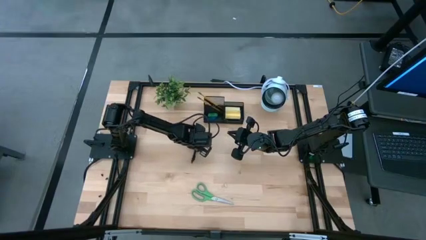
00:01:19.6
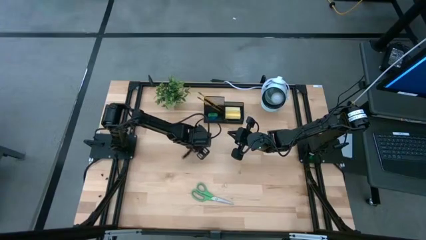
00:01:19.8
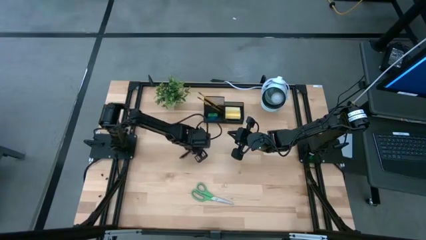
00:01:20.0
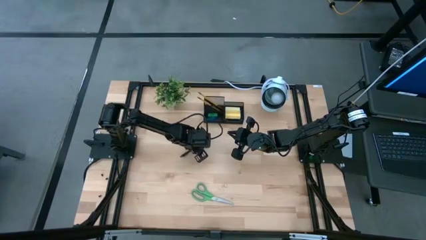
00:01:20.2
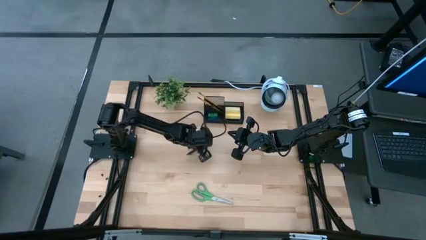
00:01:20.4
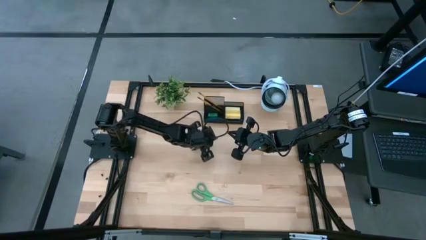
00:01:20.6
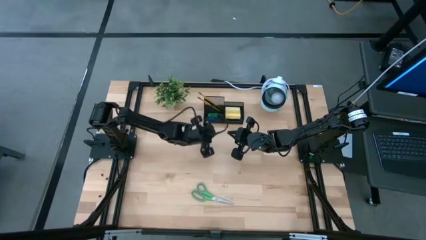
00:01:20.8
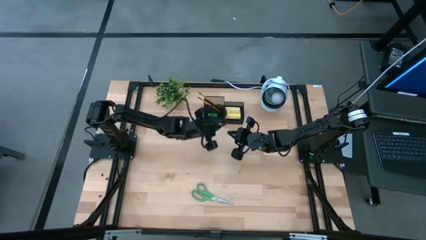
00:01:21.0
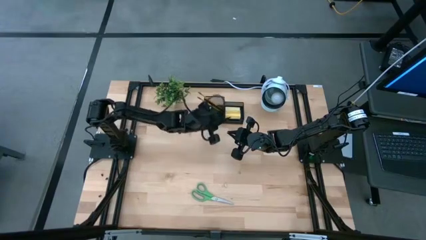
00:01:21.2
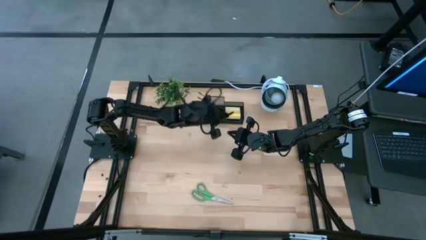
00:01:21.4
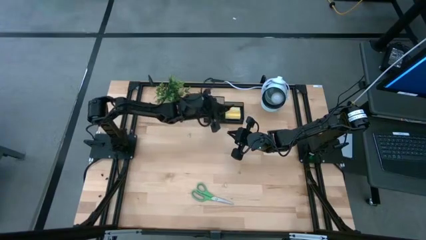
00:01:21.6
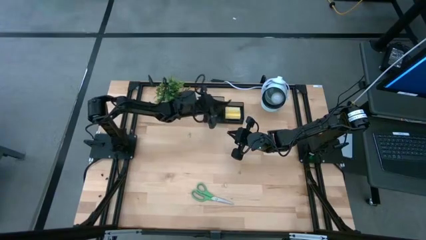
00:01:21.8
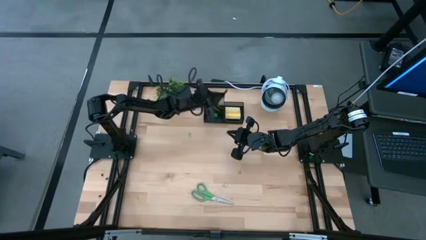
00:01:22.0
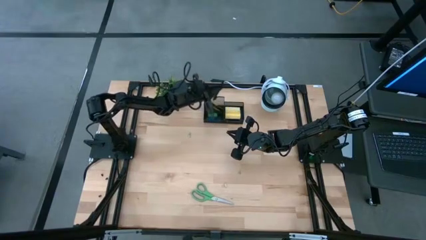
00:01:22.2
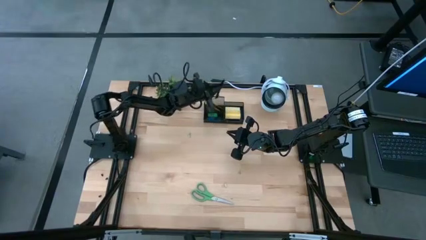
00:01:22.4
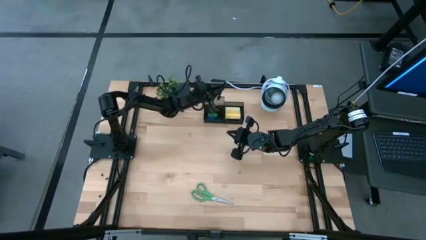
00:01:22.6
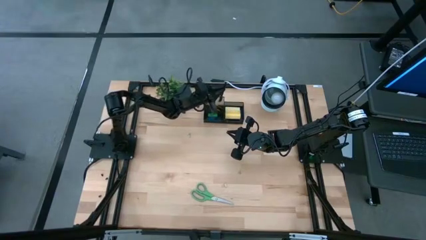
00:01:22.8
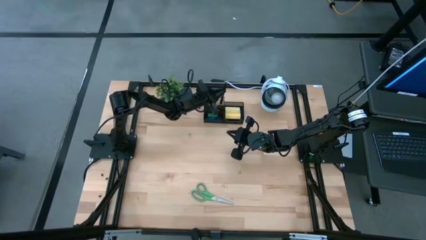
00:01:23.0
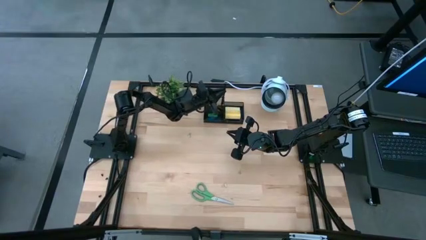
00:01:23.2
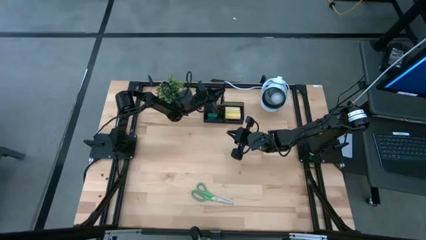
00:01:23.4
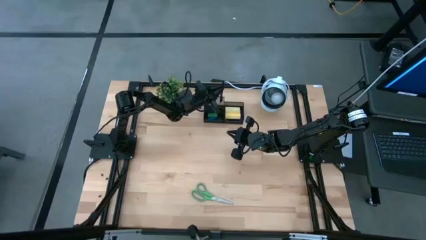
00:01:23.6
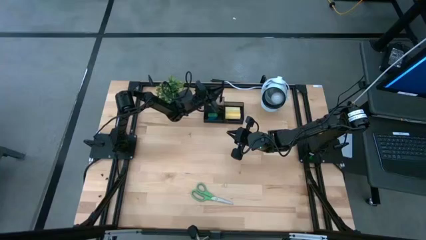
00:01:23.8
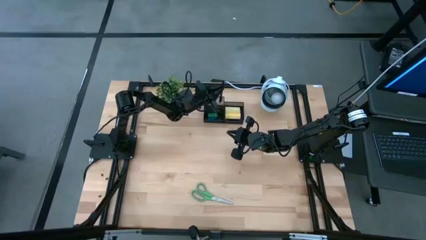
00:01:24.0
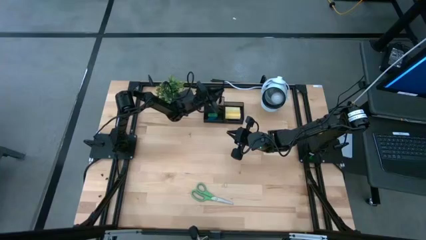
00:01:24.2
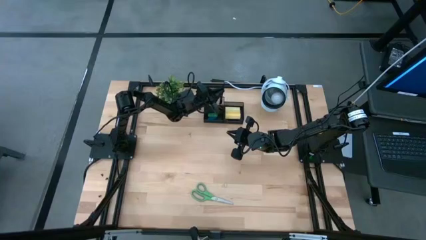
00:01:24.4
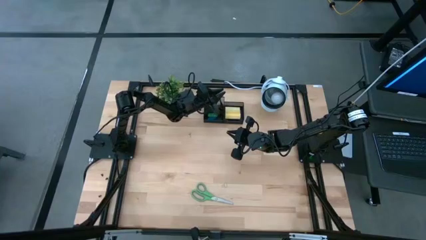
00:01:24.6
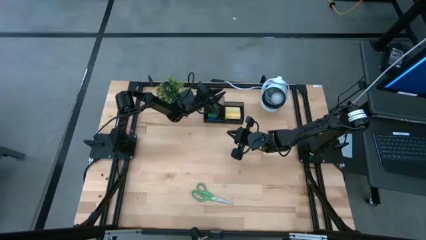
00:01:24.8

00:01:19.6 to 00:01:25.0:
Task: Pick and place office supplies into organizer
Put the black pen into the black organizer

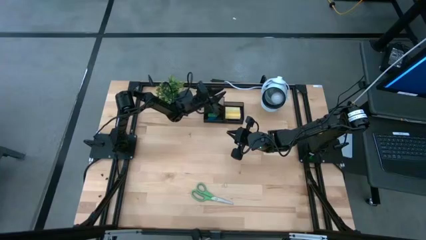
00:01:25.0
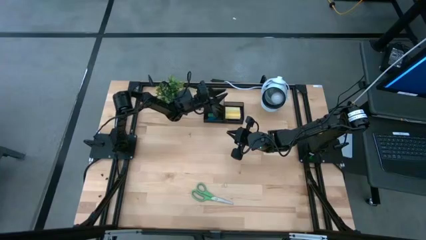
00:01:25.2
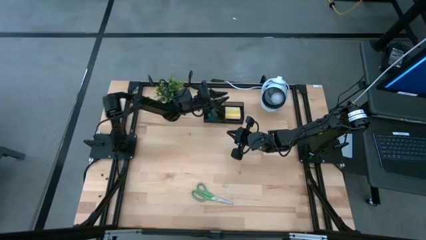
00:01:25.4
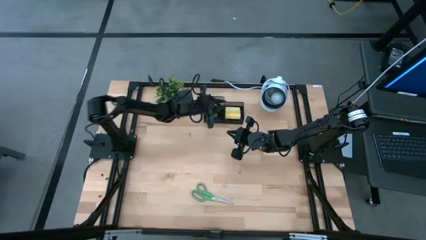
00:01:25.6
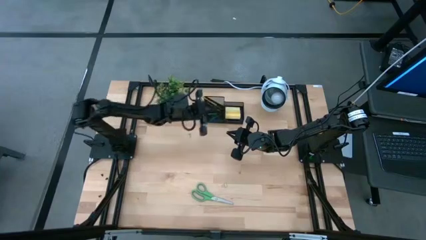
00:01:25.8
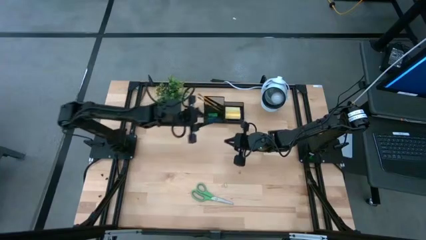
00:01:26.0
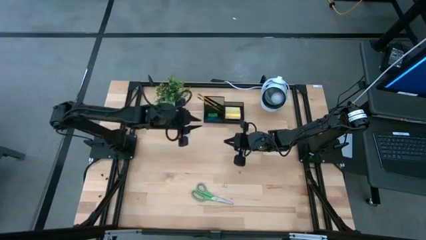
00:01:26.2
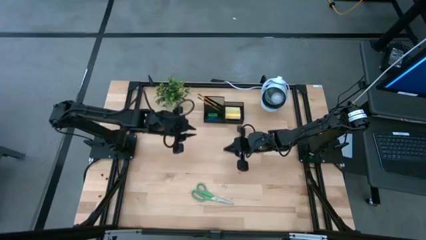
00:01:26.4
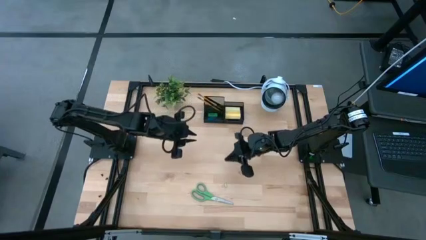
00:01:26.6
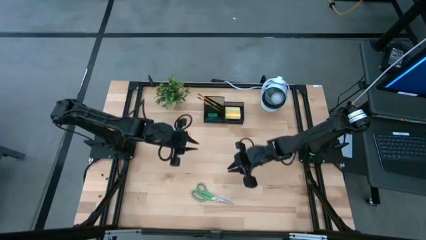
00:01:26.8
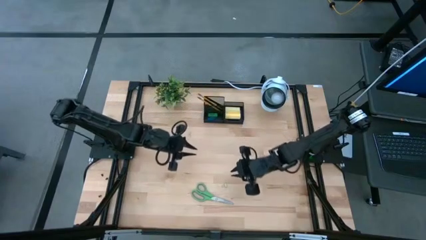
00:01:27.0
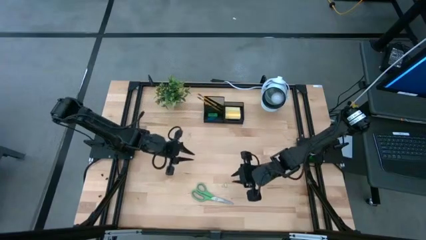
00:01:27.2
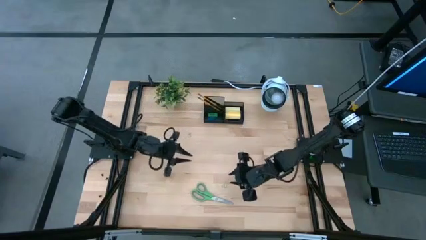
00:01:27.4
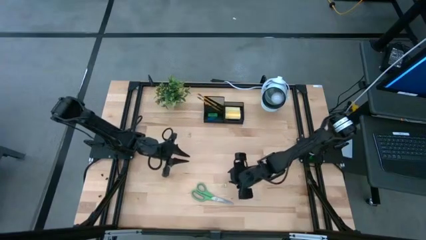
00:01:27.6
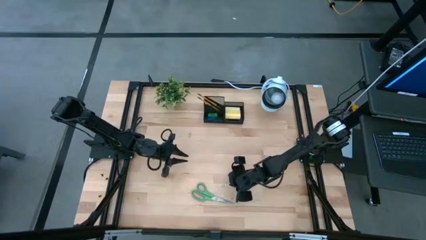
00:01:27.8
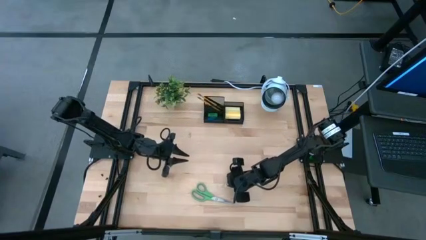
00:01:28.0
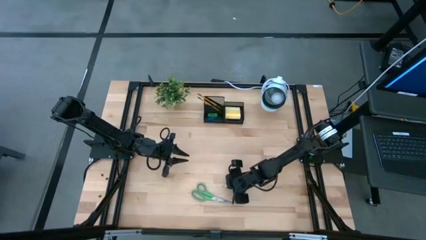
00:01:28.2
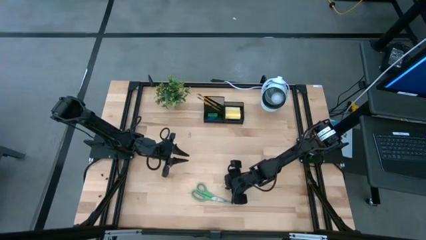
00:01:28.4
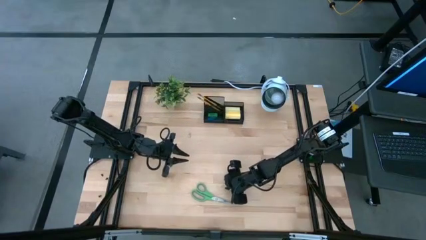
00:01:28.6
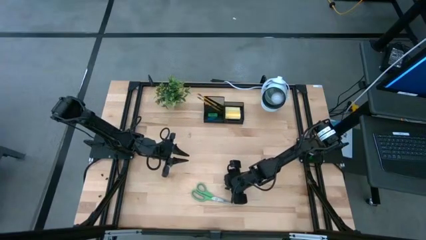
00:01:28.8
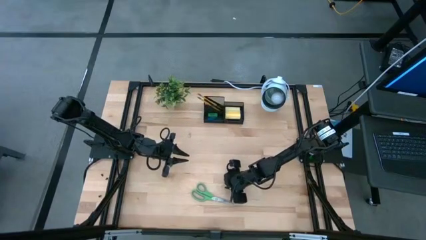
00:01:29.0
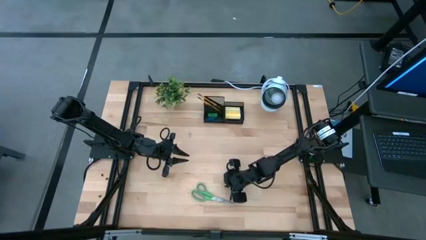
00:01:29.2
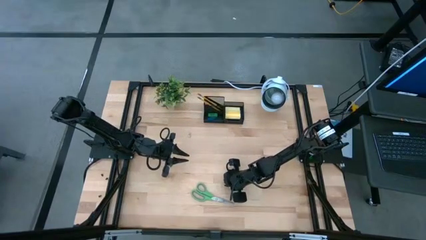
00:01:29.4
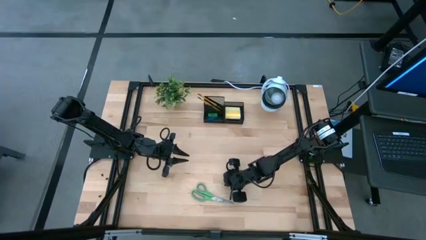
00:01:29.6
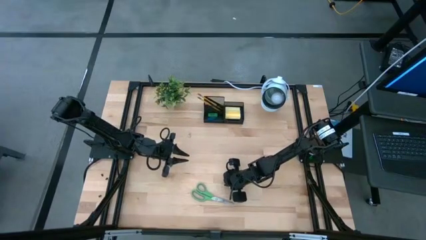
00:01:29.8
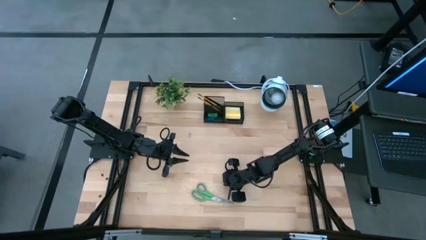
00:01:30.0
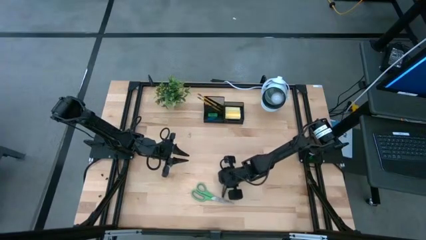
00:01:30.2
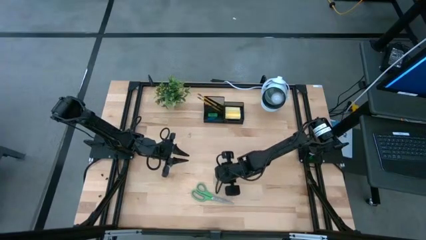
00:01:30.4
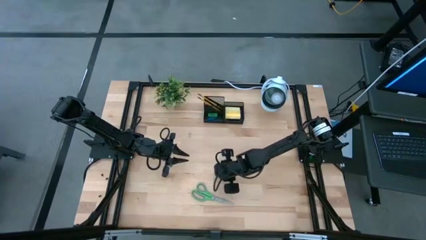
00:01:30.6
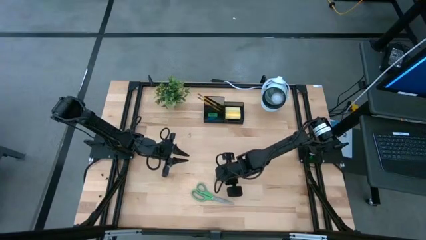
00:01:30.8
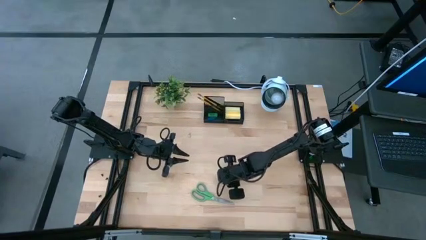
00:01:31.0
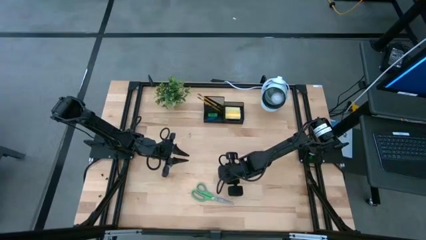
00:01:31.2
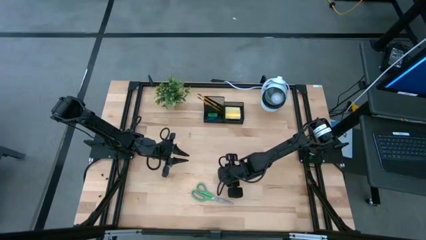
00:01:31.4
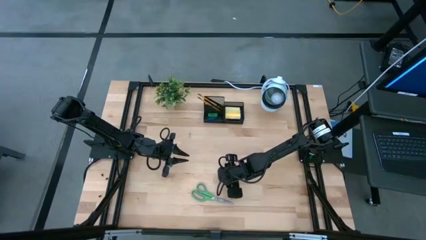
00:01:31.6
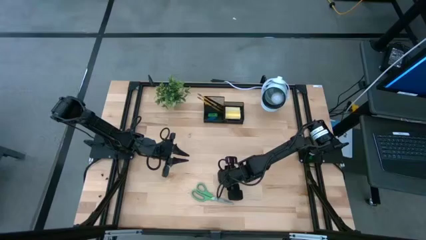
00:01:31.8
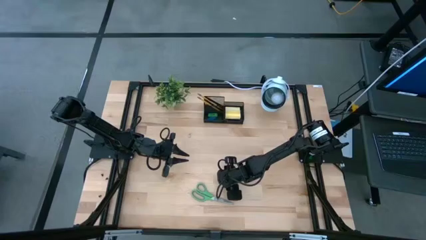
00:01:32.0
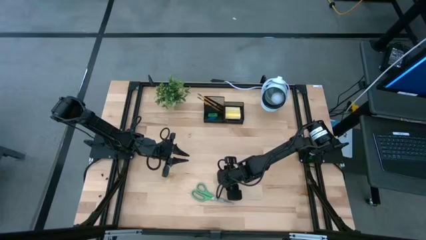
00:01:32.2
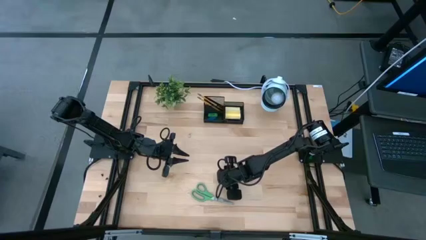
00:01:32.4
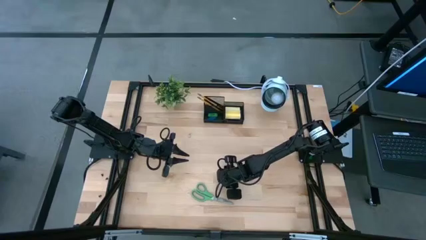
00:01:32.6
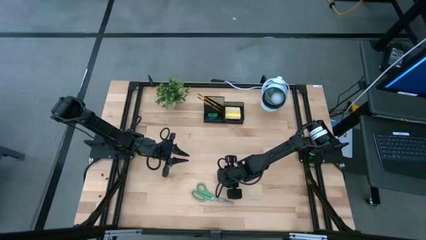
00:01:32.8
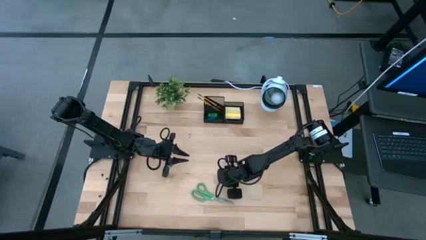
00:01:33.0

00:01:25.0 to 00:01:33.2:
Put the bottom yellow binder clip into the black organizer

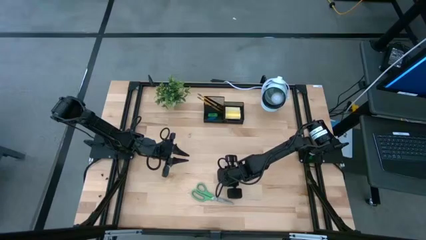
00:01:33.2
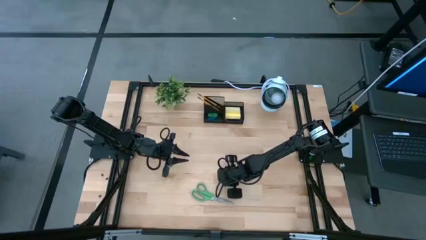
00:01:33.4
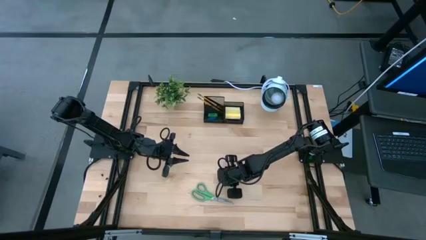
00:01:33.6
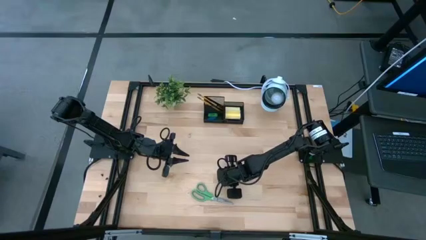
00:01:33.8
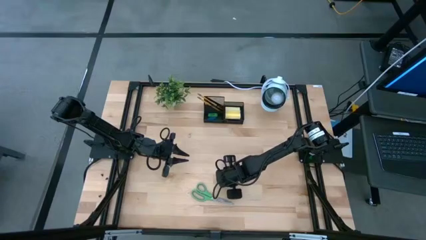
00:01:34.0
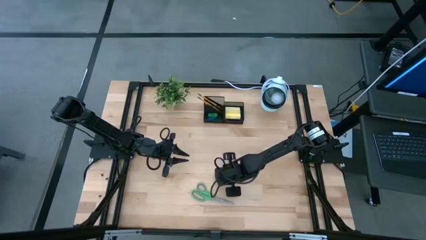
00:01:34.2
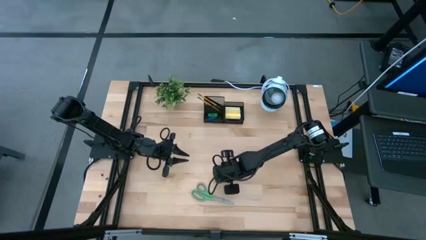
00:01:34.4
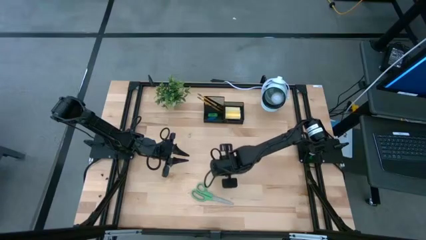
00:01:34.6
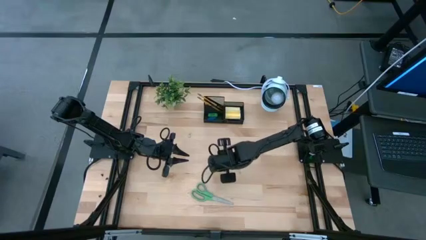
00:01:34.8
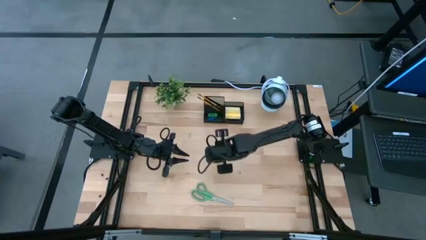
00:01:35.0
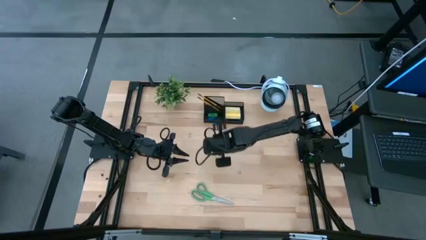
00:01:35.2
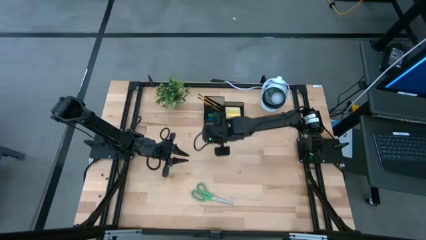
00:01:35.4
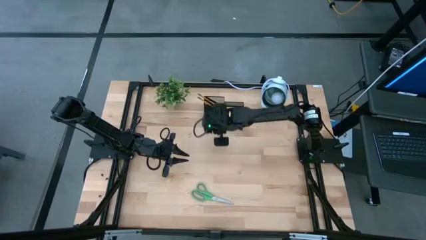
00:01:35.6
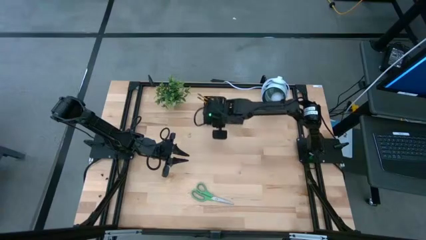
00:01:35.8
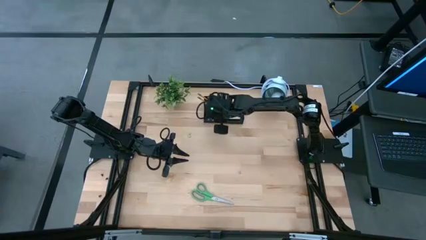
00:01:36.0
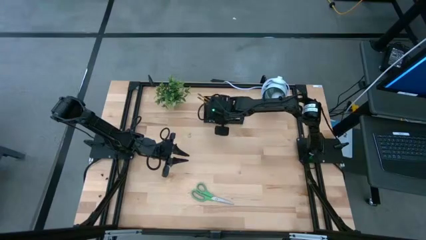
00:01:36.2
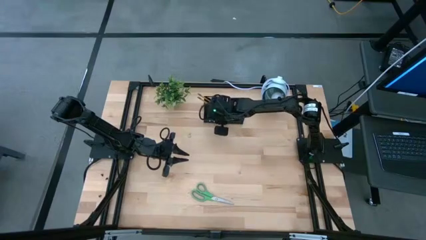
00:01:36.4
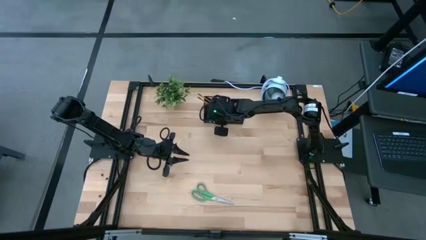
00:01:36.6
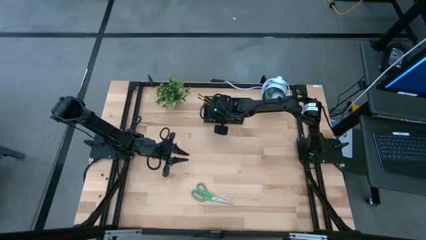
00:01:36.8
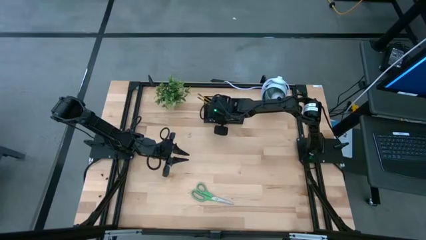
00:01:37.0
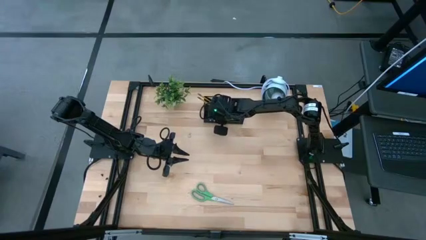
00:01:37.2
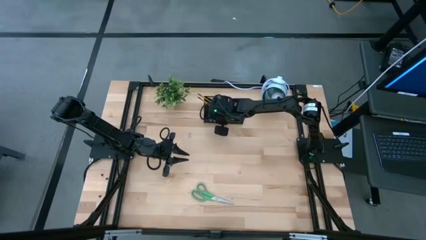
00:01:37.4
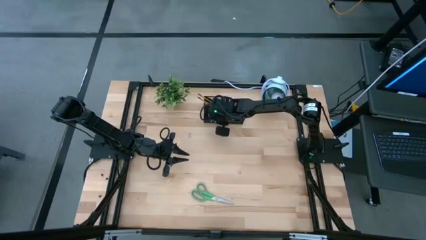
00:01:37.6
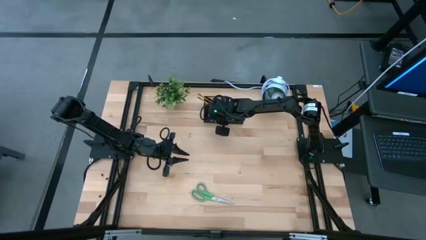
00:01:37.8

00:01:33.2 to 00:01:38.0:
Put the bottom yellow binder clip into the black organizer
